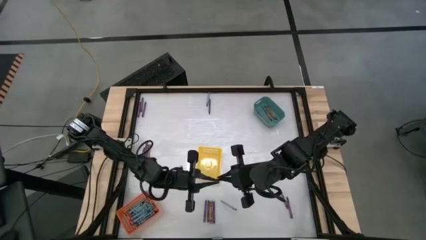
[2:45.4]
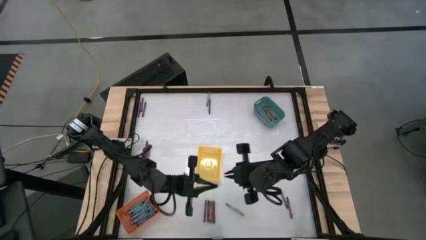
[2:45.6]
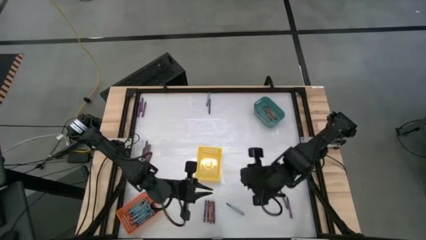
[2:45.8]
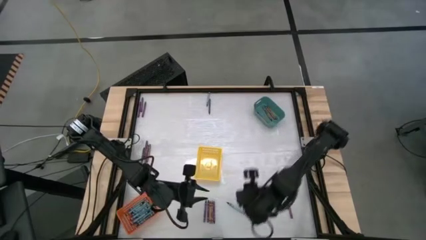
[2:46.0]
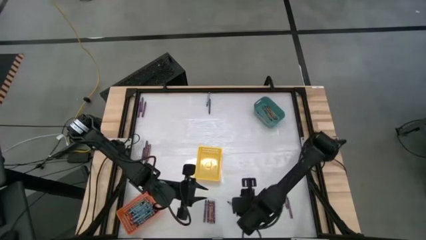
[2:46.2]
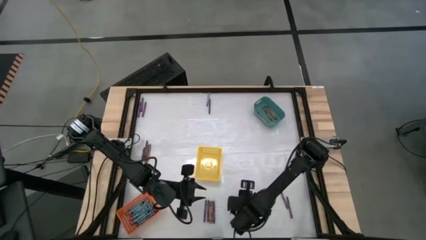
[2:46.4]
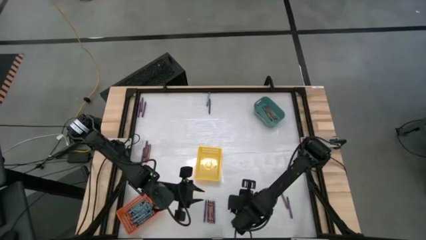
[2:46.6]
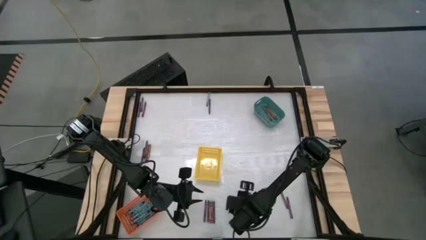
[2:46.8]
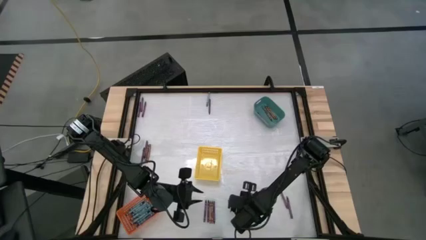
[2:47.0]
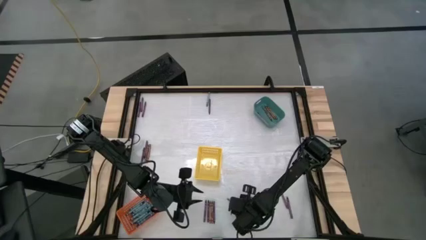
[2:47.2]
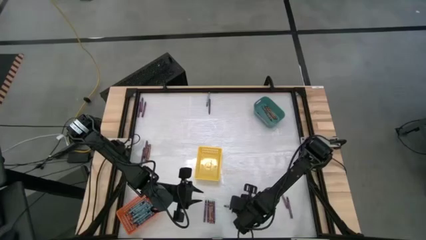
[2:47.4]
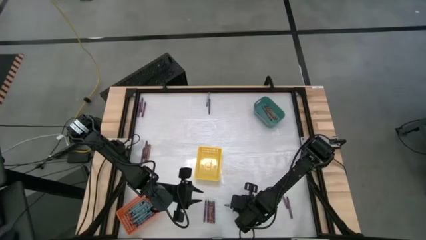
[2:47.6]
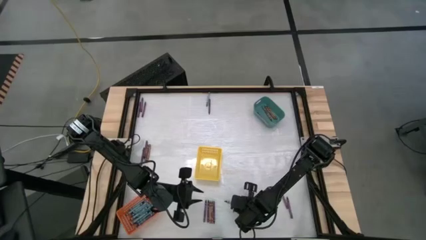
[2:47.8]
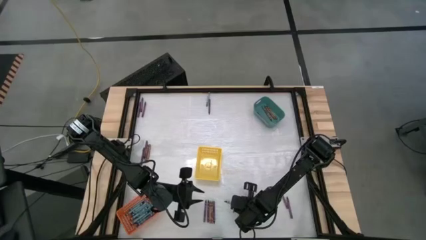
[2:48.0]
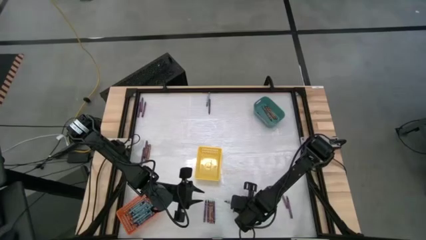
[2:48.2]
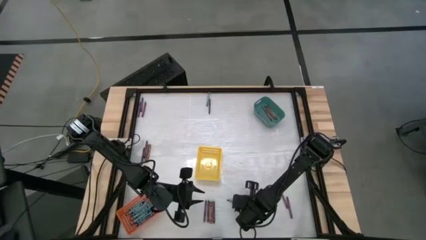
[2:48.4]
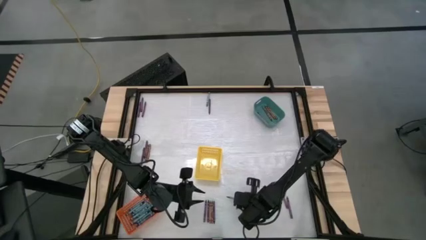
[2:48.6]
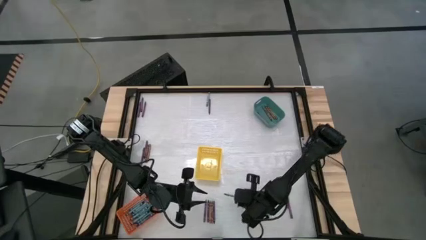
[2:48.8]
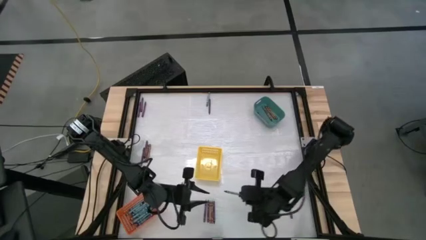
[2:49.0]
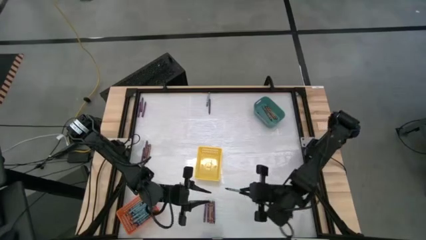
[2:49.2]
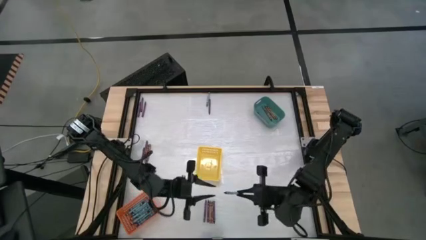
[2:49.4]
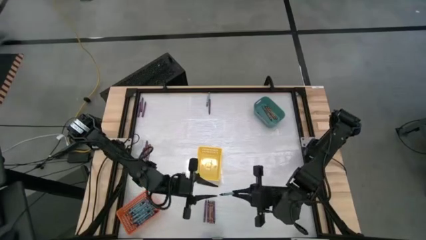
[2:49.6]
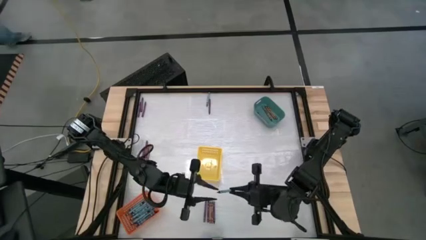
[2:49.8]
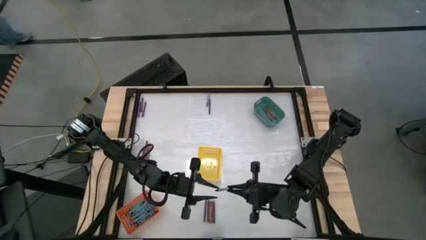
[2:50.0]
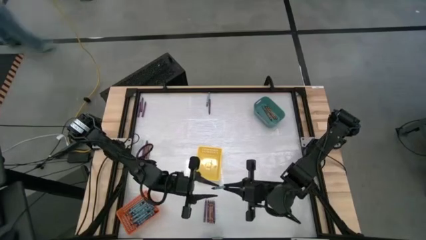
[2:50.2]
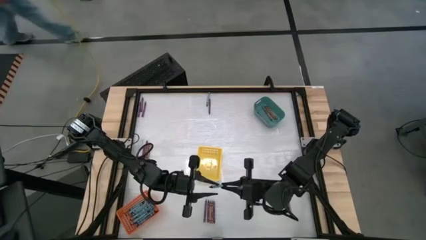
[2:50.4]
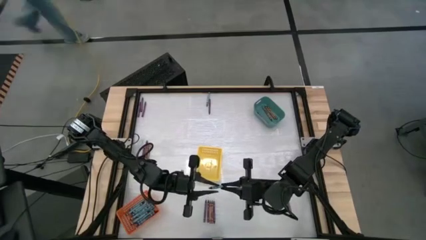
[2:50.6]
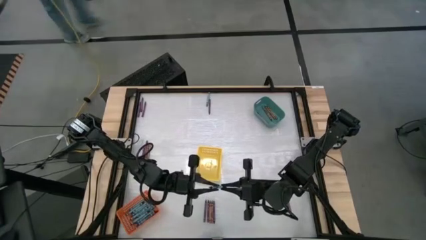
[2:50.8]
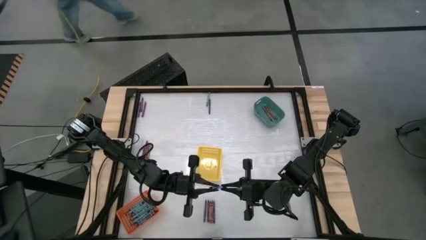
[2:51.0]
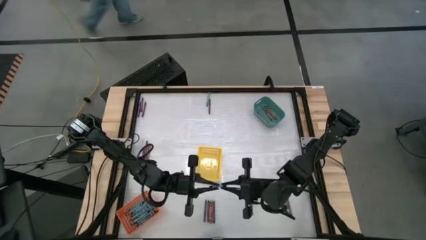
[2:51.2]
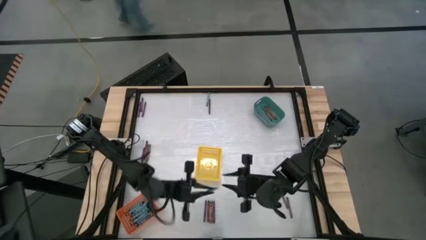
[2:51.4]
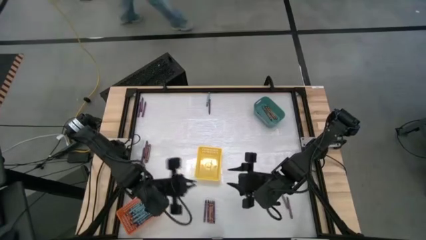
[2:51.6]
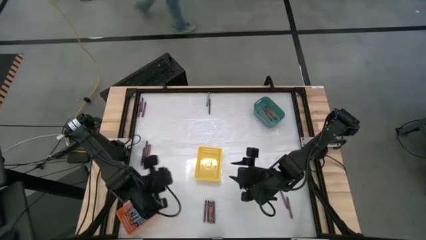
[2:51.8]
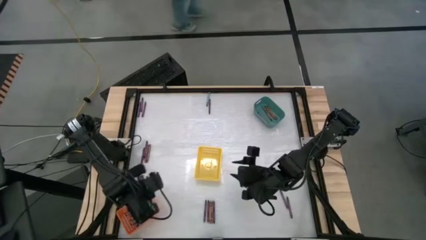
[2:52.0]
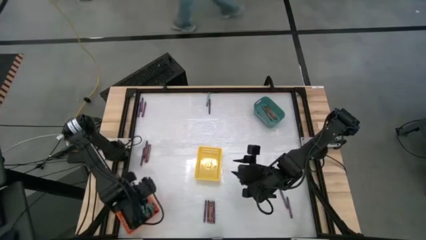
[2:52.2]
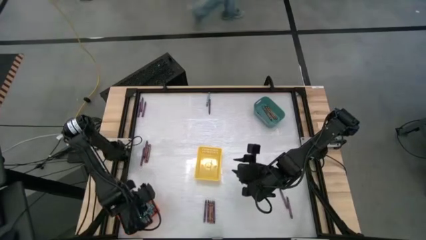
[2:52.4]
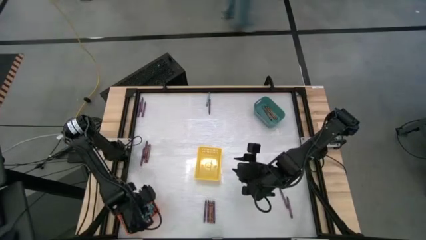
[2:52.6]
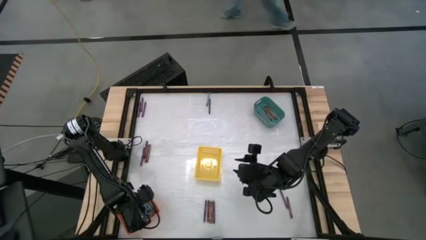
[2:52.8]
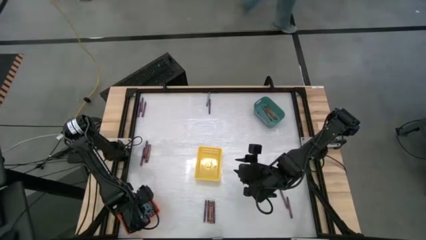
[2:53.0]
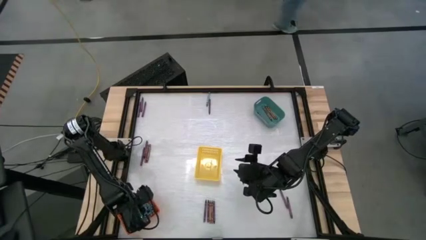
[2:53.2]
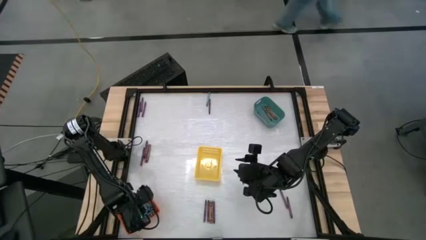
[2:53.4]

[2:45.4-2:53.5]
Task: Sort crayons
Put the blue crayon into the orange basket

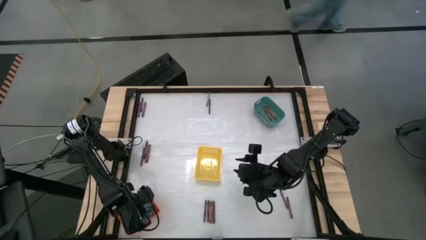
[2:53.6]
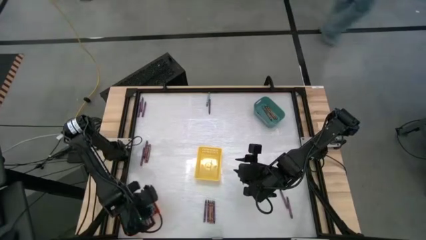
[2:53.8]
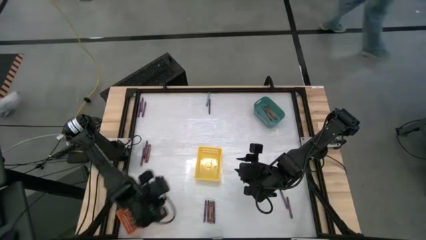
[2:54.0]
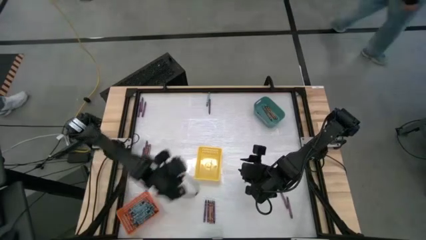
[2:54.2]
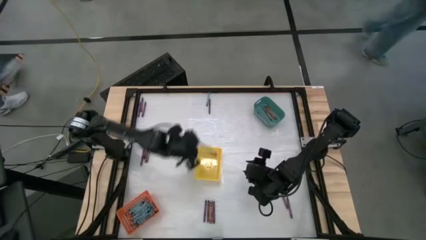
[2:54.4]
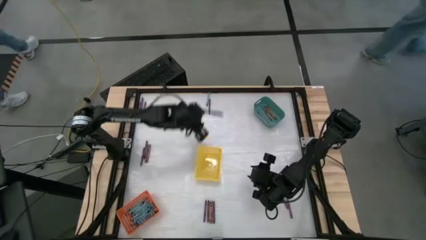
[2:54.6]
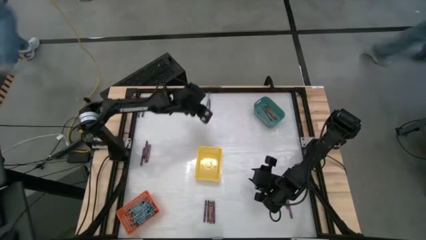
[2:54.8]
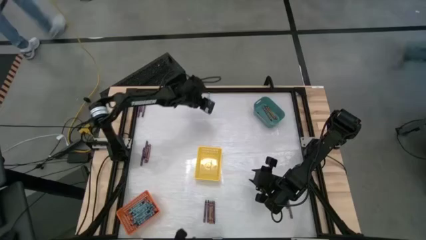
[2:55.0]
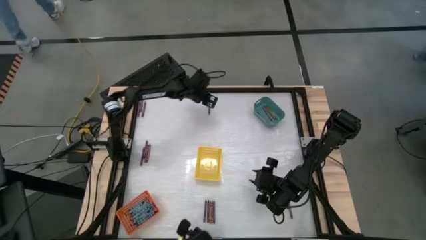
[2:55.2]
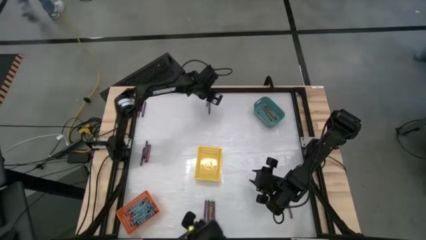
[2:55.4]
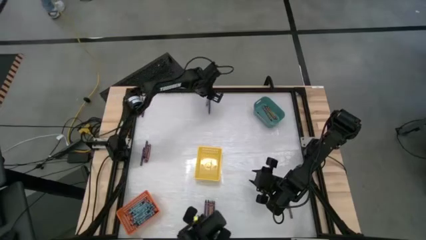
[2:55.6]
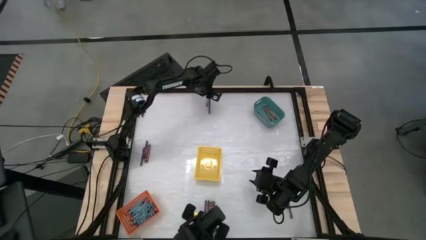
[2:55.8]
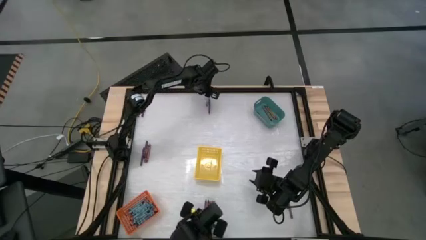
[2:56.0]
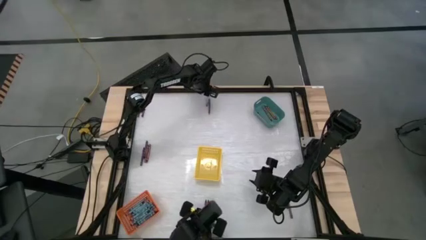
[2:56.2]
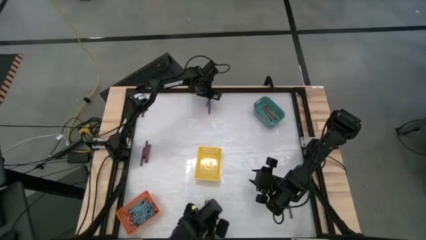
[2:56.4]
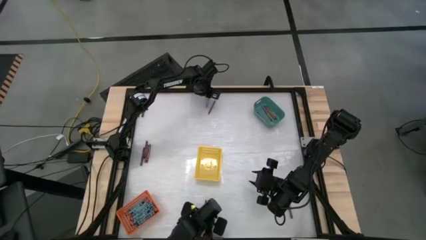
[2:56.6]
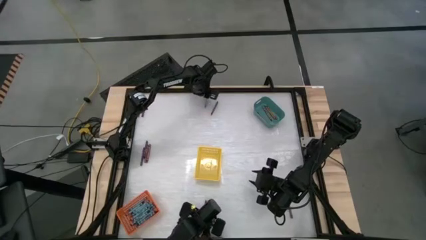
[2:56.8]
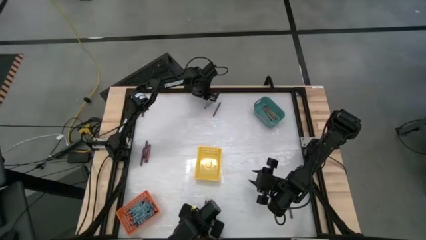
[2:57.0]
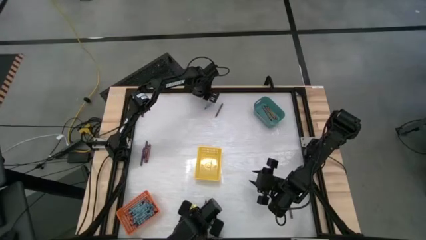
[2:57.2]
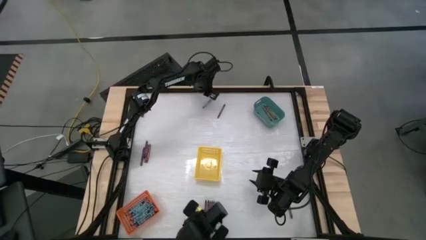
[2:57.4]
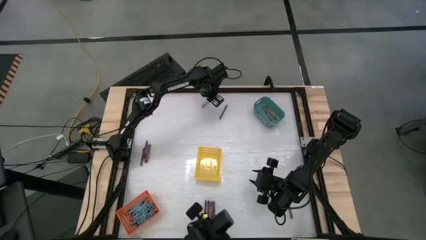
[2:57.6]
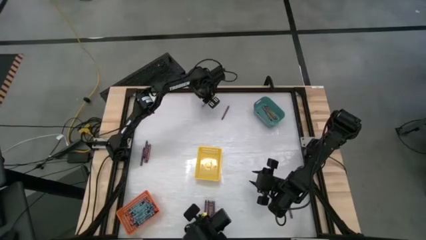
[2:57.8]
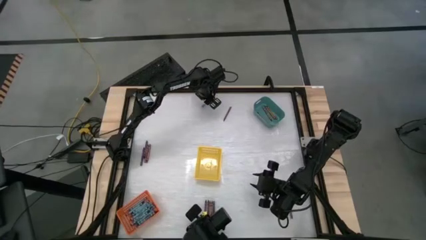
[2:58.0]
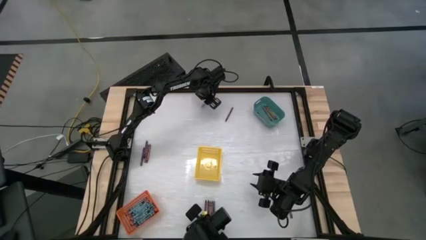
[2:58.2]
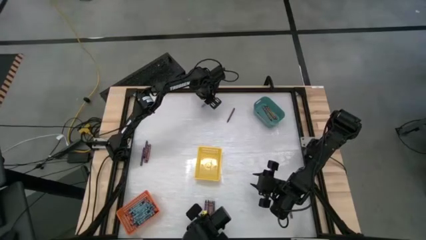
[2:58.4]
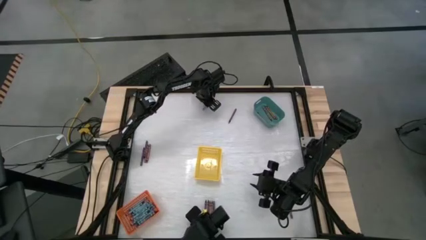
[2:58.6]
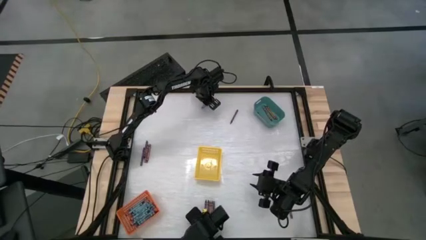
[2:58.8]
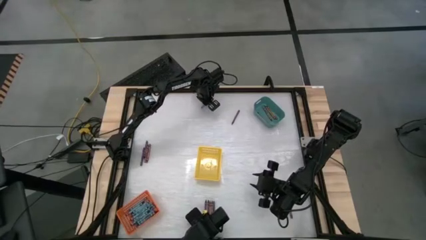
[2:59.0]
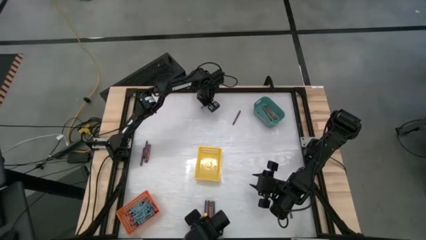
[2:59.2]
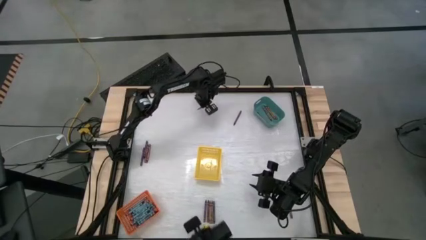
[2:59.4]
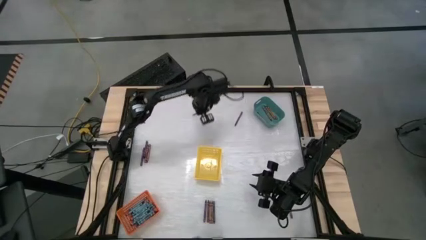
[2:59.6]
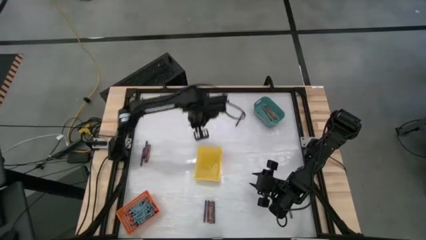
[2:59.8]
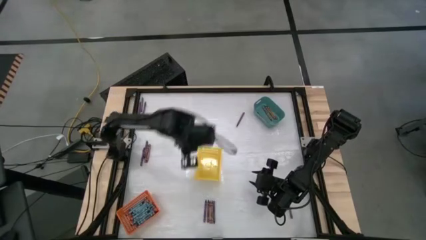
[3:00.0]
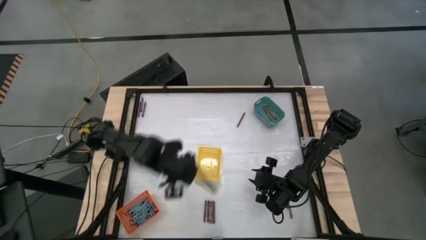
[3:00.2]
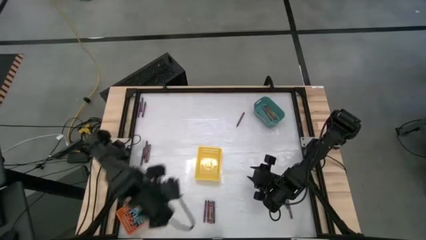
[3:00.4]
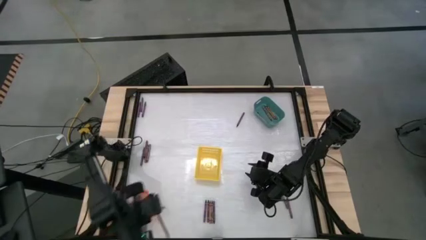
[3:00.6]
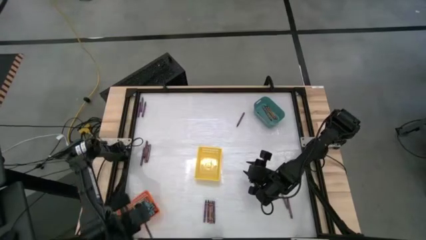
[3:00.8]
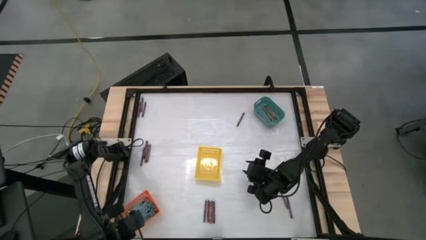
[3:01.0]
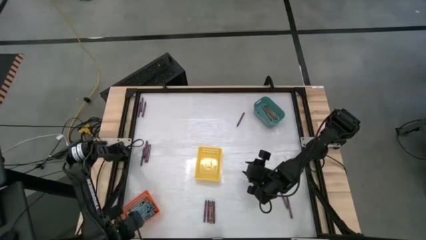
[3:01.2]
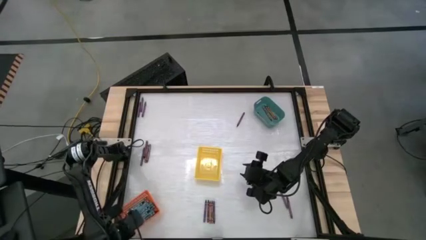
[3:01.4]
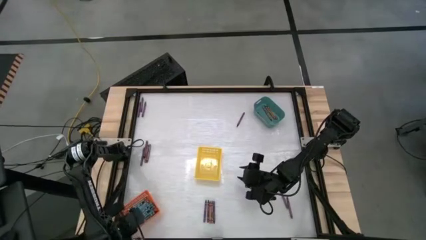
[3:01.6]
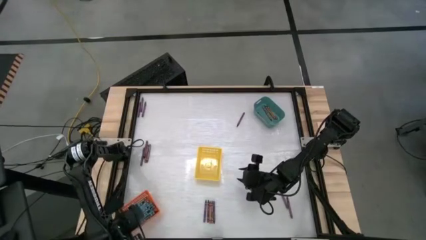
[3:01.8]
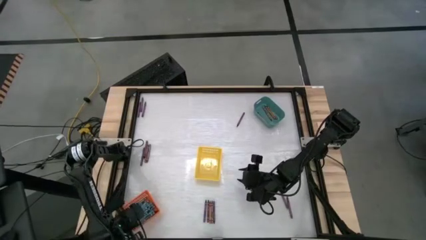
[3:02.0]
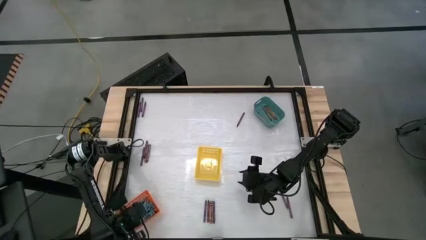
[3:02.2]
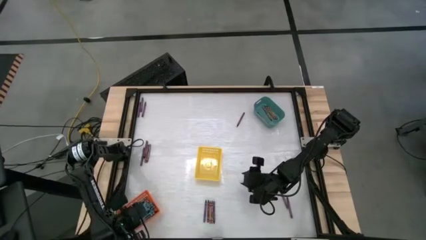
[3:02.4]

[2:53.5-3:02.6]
Put the blue crayon into the orange basket
